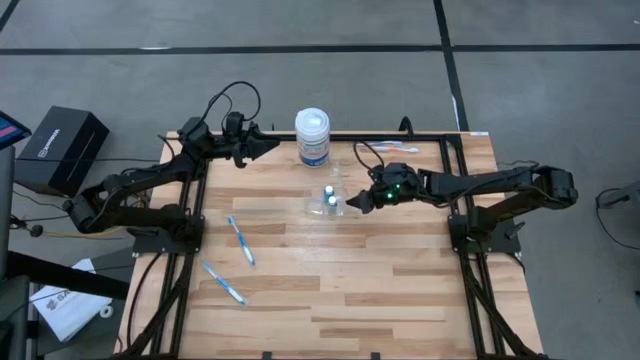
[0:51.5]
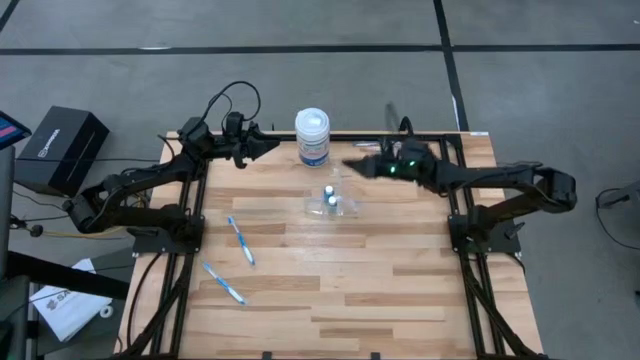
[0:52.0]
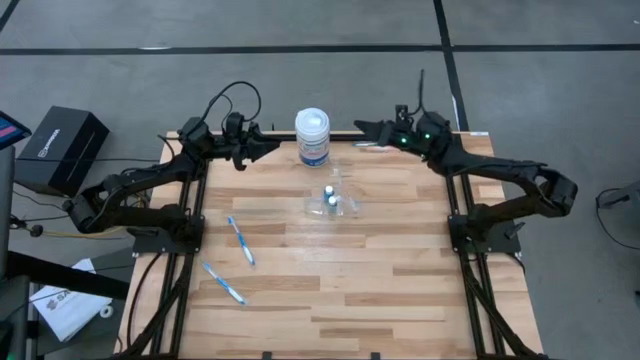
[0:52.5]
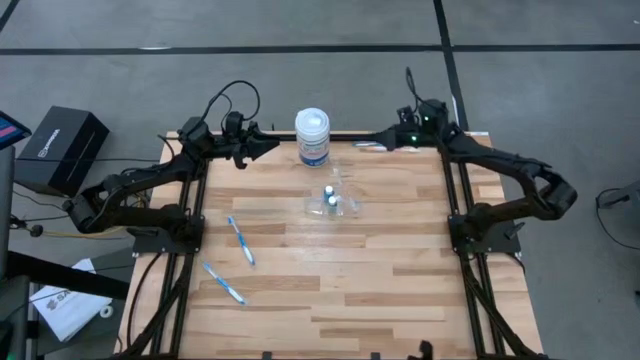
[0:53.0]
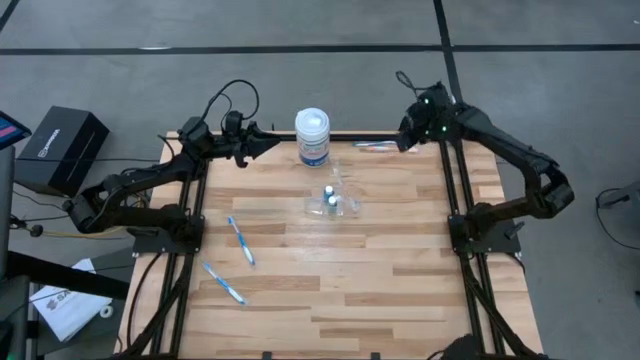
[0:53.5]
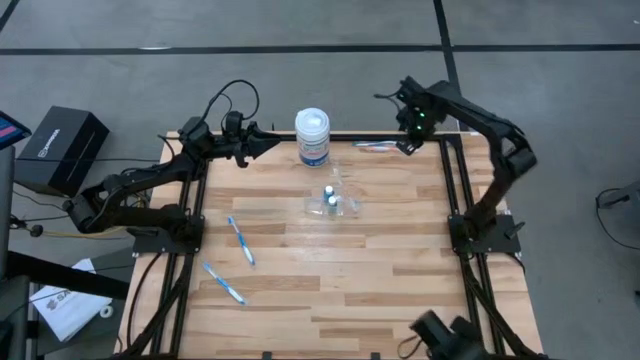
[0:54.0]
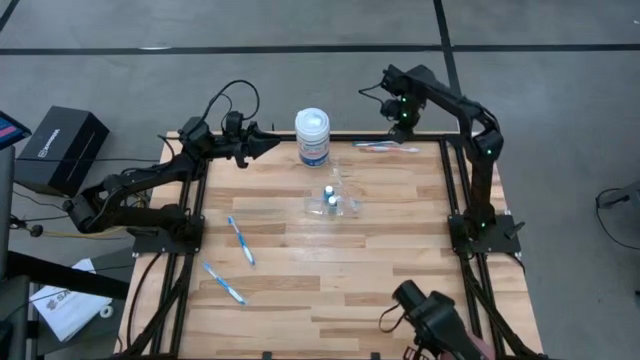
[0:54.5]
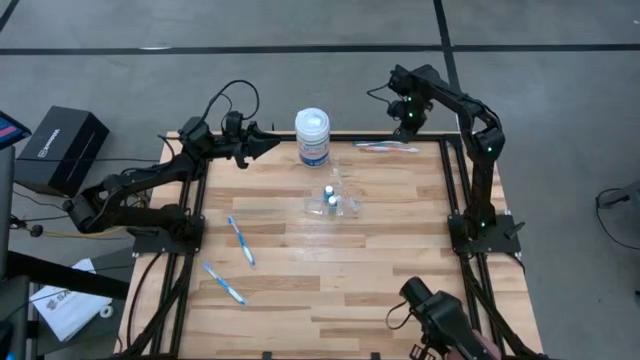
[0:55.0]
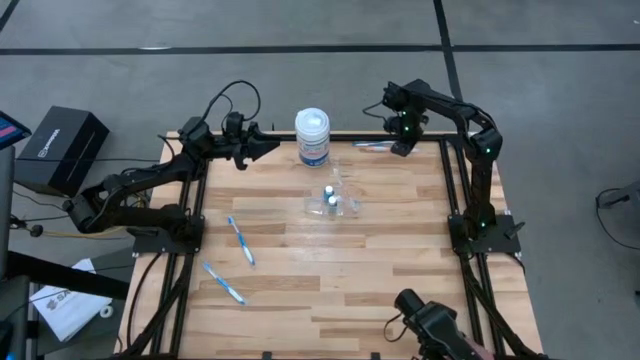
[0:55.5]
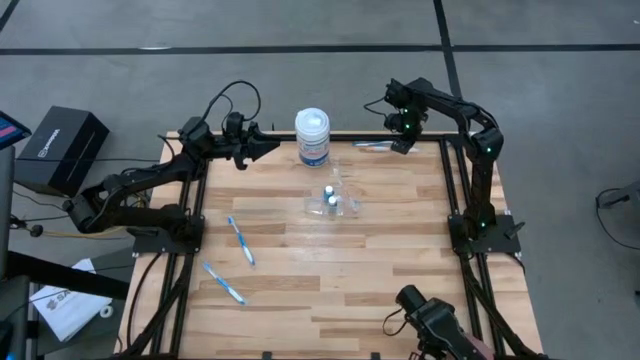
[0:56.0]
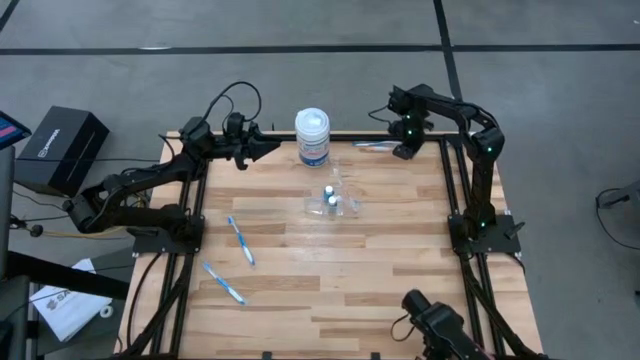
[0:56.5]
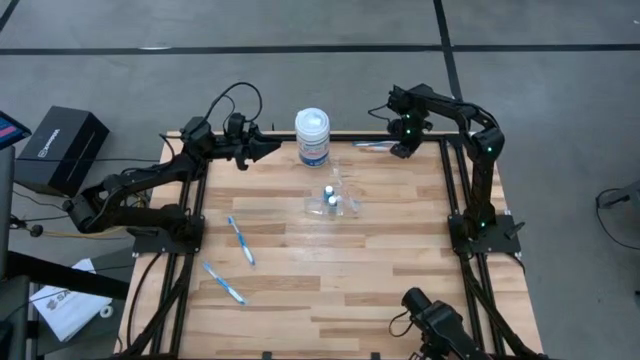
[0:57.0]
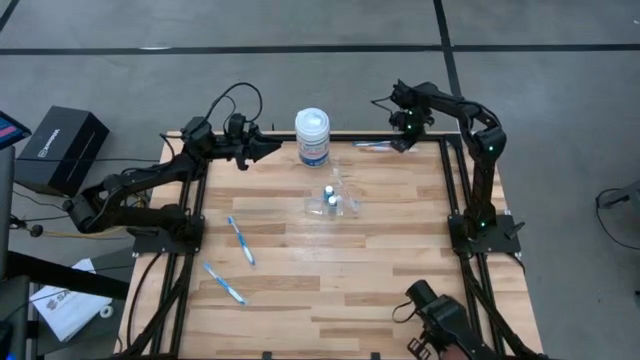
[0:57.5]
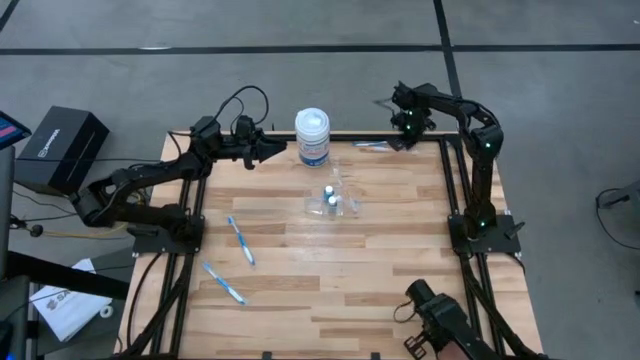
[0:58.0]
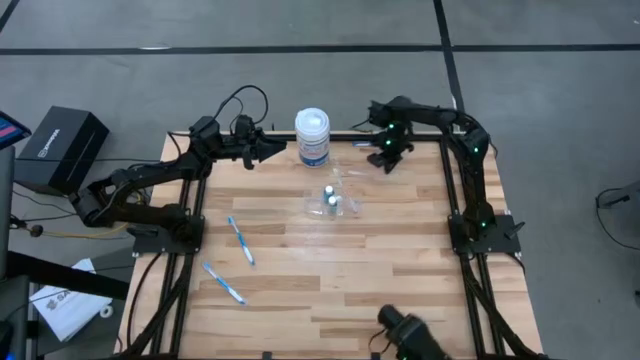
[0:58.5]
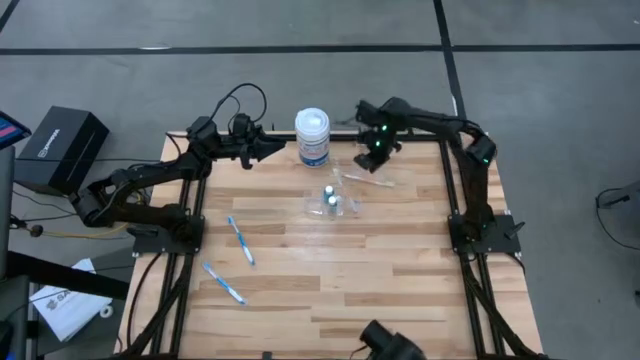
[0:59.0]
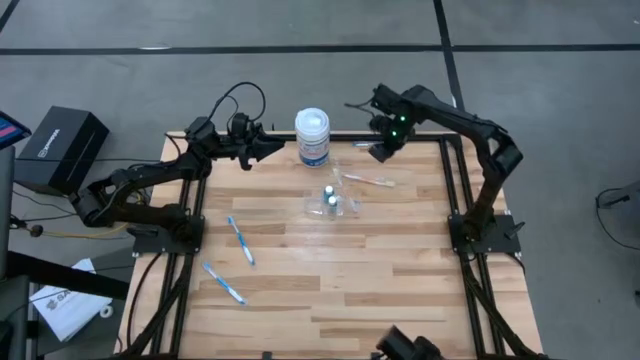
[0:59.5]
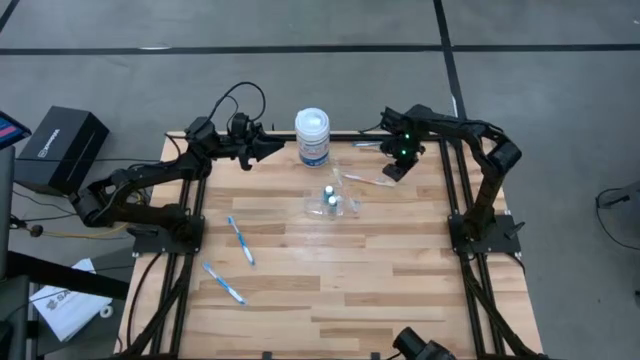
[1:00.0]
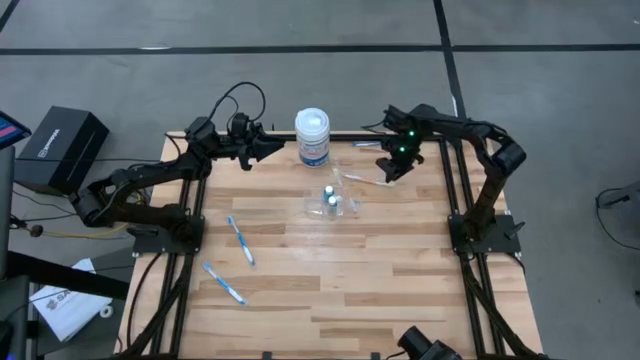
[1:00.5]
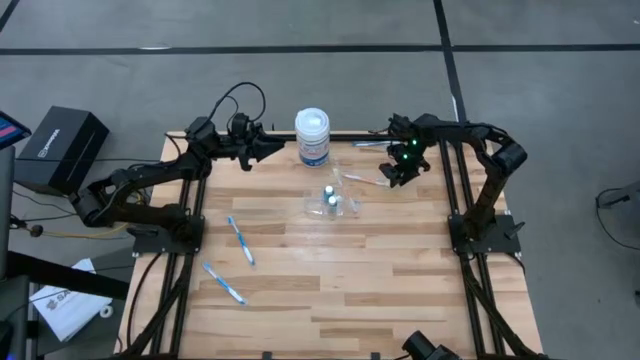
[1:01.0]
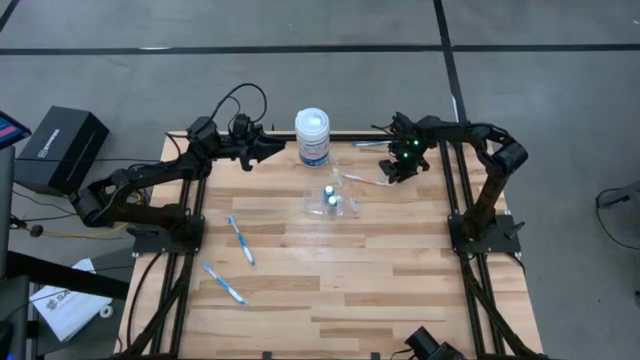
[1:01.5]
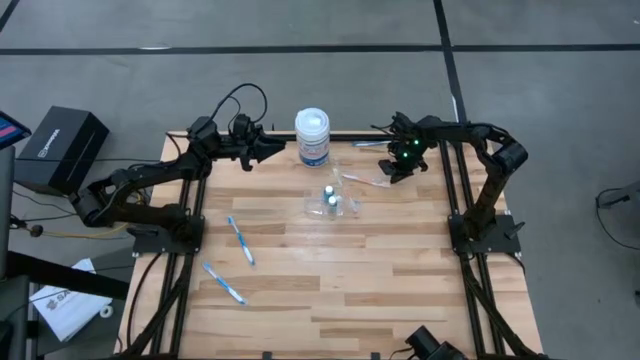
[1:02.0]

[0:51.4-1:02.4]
Task: Pick & Place toothbrushing station
Put the orange toothbrush into the transparent organizer

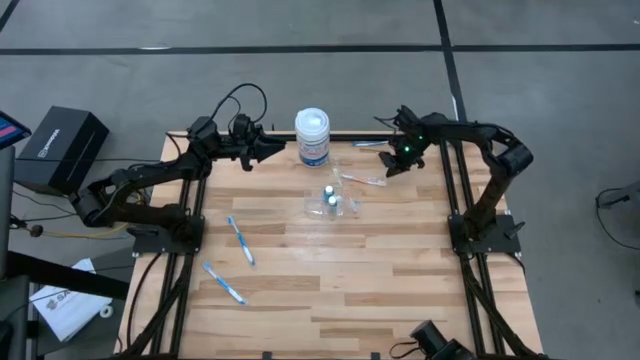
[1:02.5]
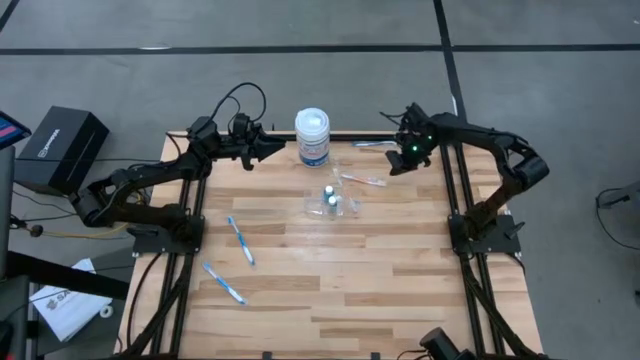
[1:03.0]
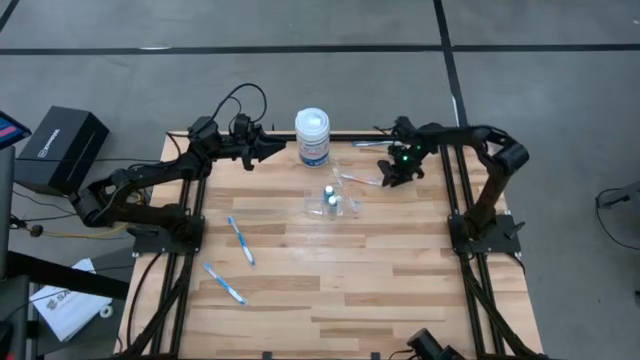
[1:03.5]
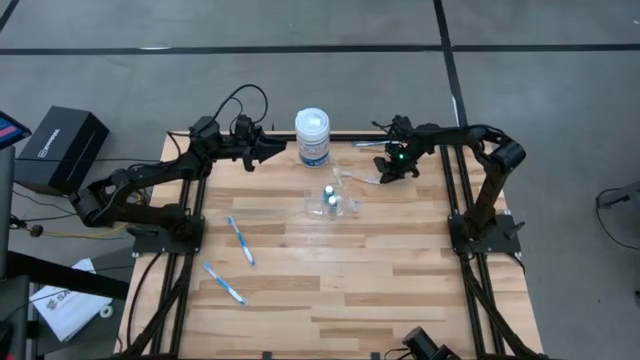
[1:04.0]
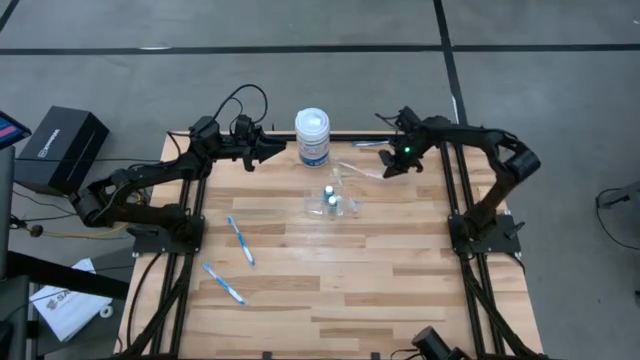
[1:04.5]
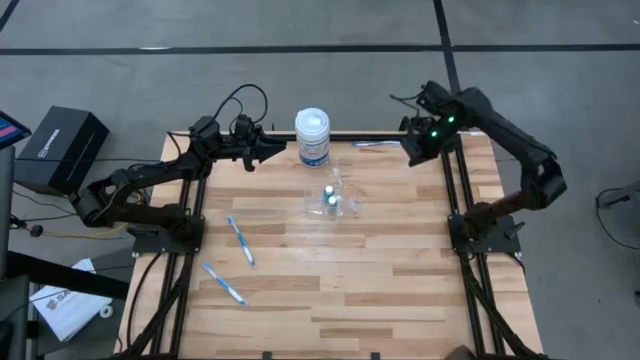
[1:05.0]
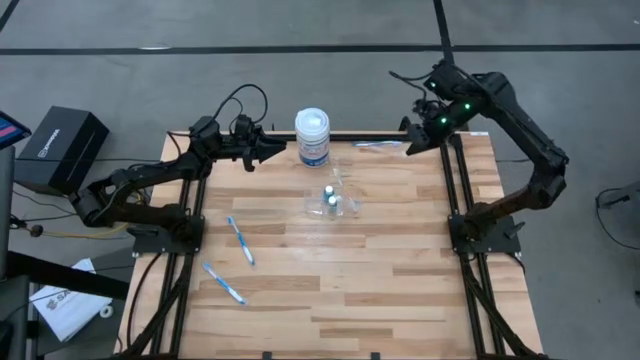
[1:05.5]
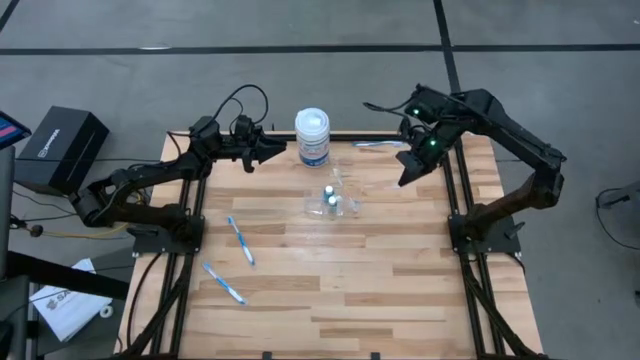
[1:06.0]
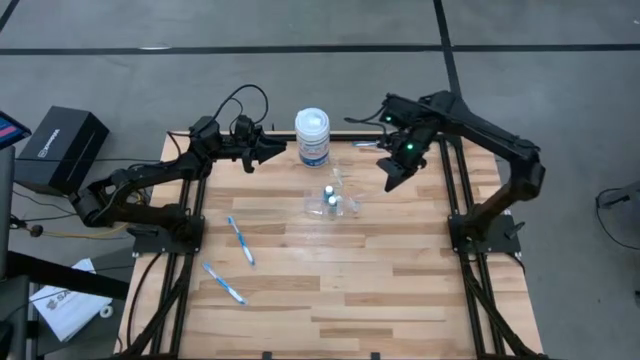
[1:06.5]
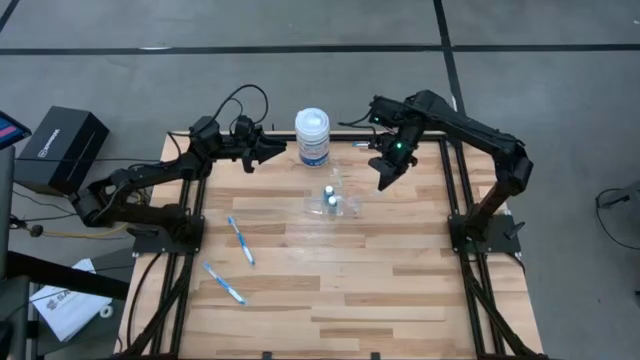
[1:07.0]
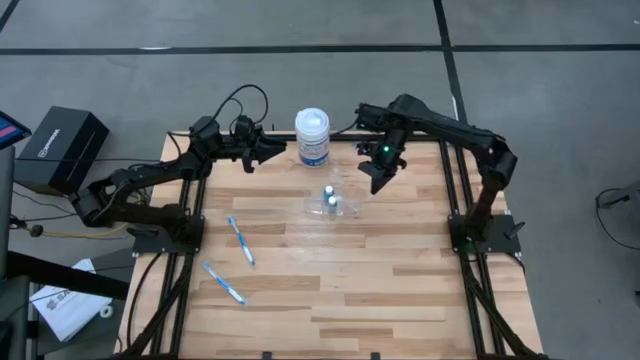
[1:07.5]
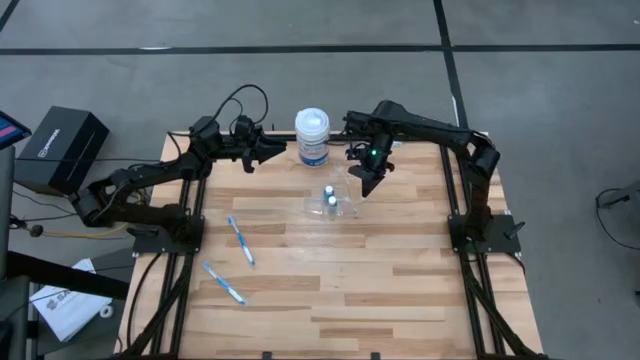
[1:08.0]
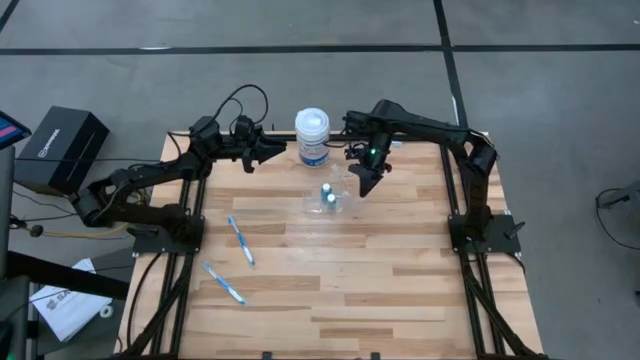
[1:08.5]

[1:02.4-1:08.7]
Put the orange toothbrush into the transparent organizer

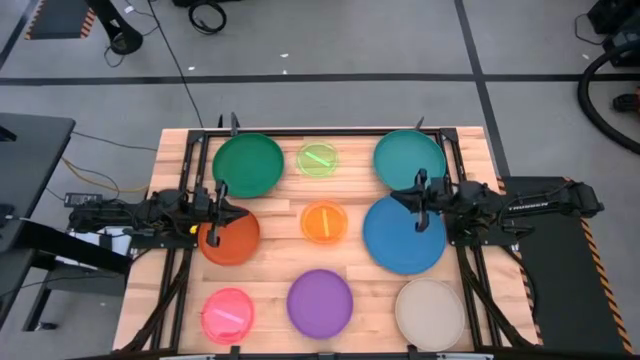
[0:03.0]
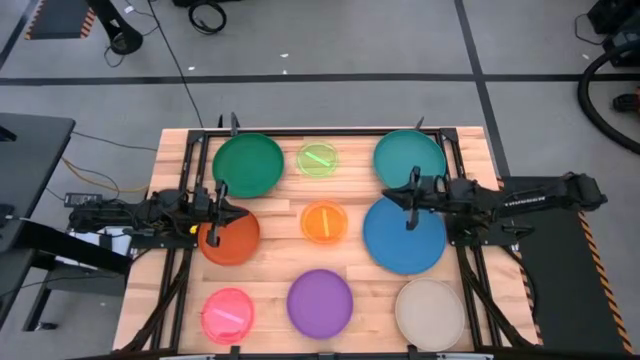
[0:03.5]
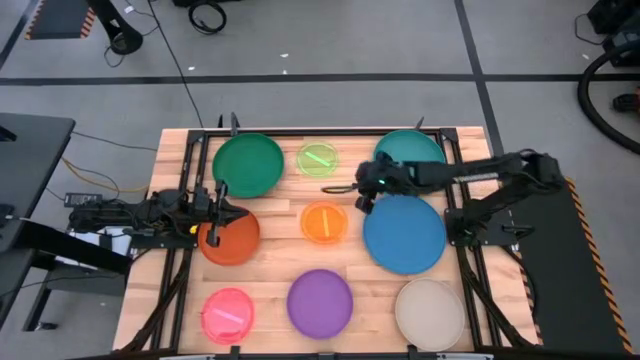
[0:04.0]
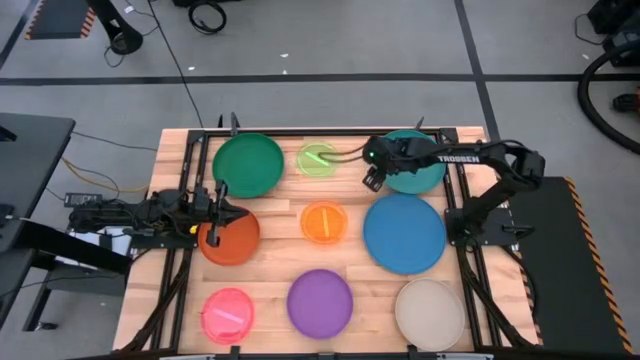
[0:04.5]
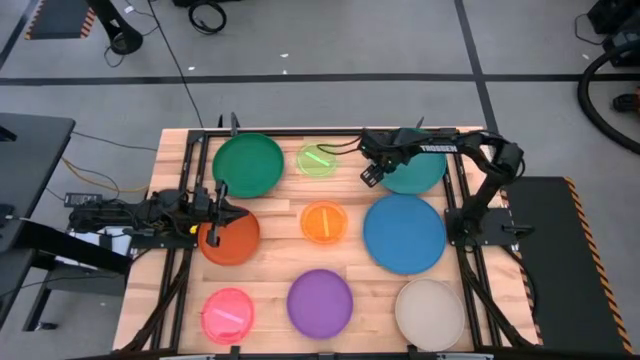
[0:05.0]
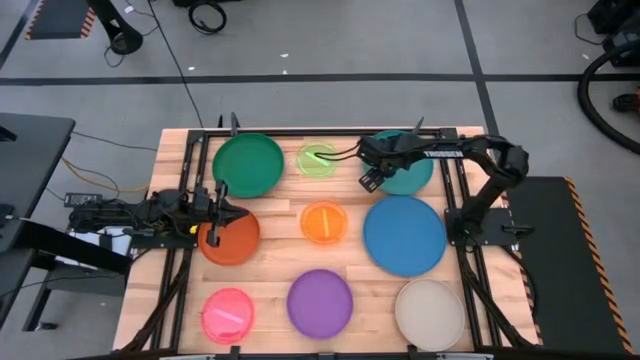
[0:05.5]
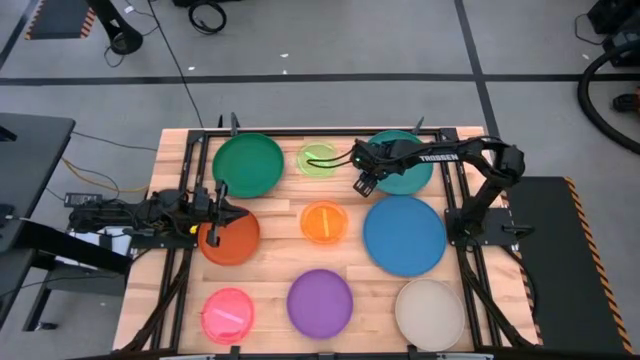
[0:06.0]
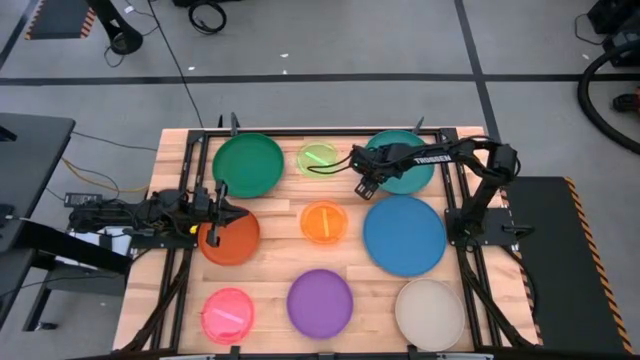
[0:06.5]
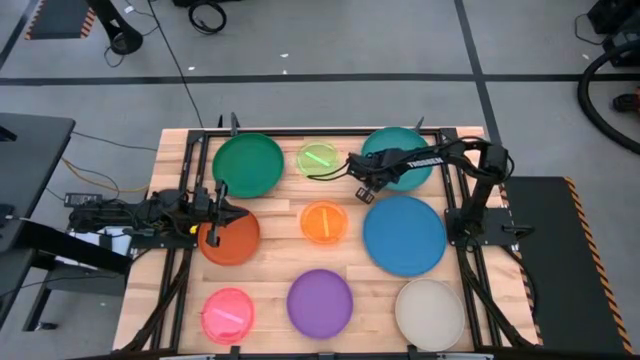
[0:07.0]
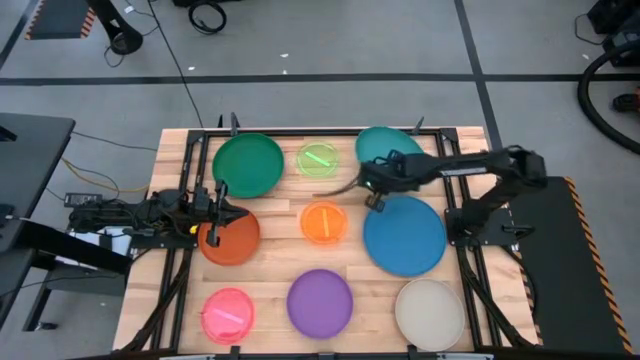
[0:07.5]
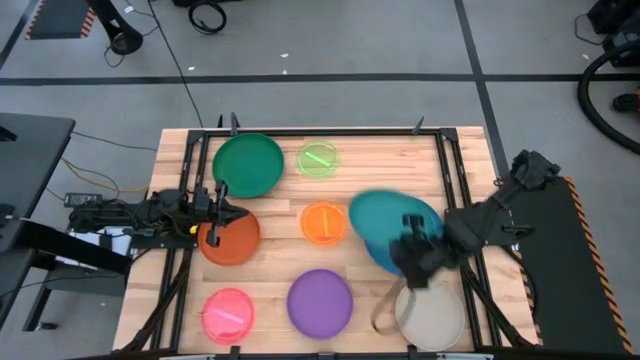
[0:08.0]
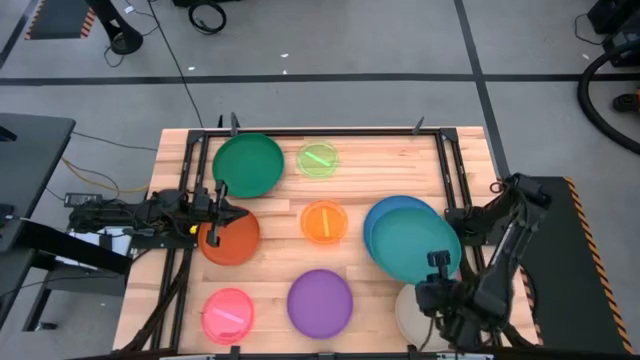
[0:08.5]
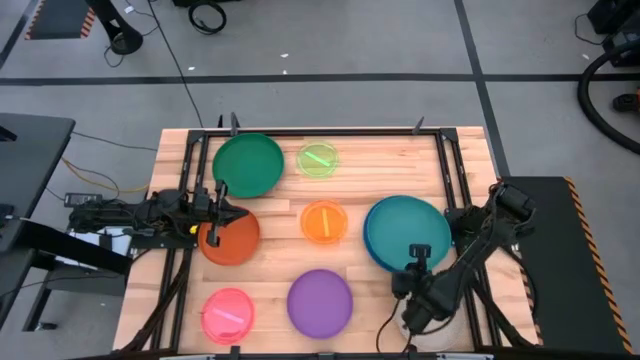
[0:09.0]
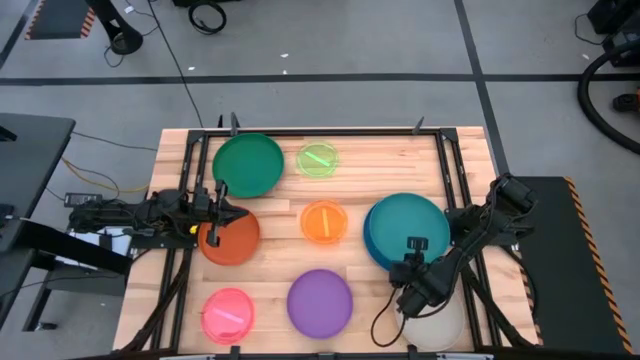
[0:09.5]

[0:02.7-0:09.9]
Task: Stack plastic plates
Stack the light green plate on top of the blue plate
